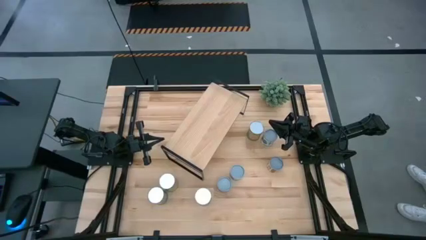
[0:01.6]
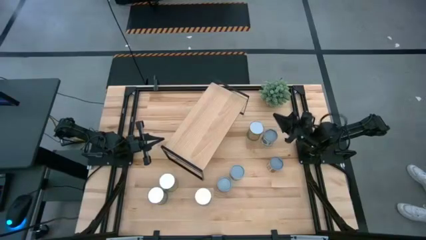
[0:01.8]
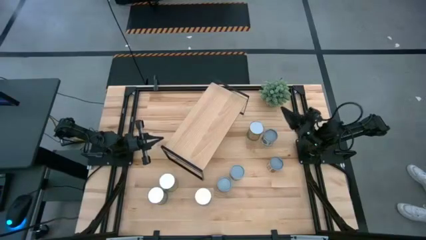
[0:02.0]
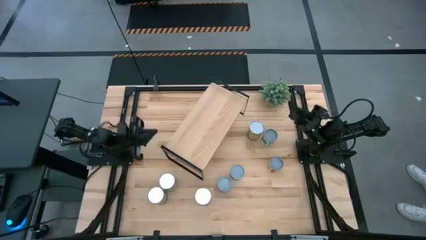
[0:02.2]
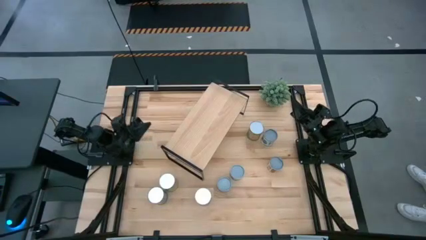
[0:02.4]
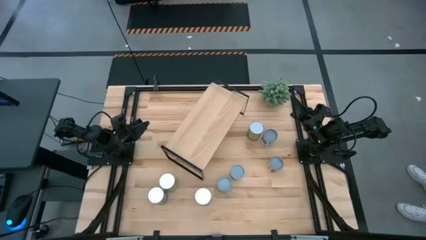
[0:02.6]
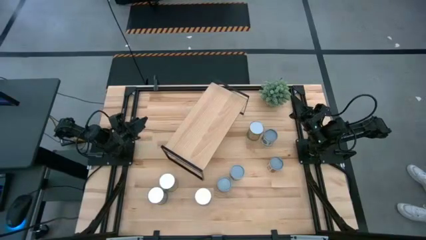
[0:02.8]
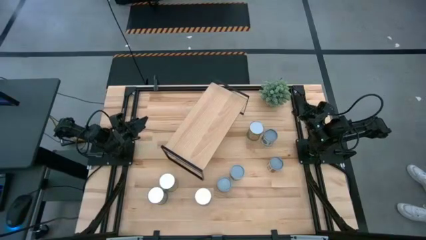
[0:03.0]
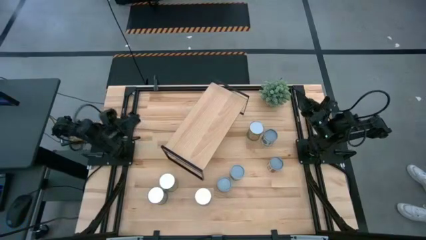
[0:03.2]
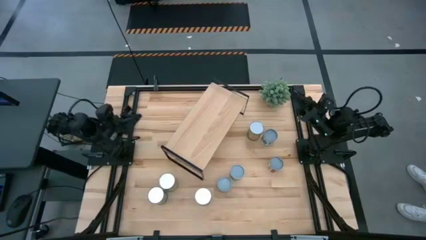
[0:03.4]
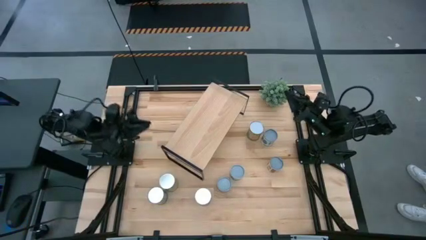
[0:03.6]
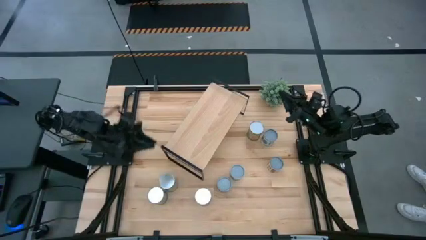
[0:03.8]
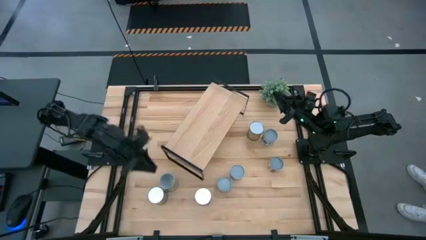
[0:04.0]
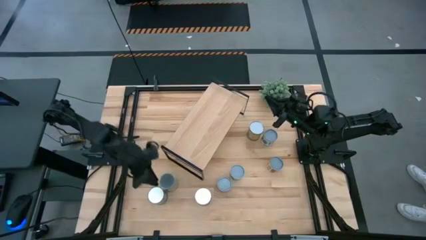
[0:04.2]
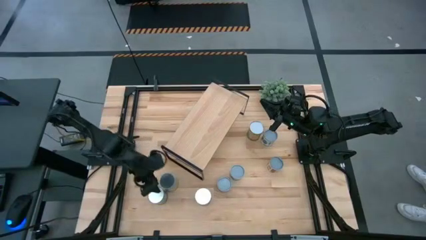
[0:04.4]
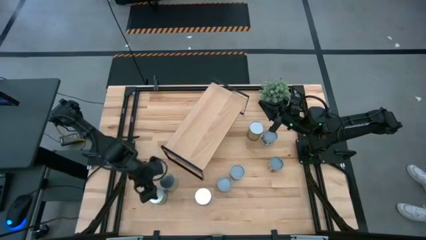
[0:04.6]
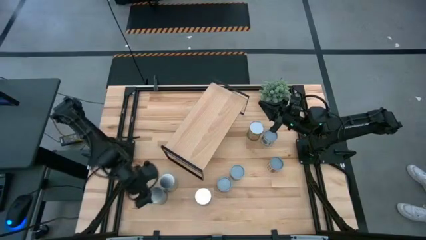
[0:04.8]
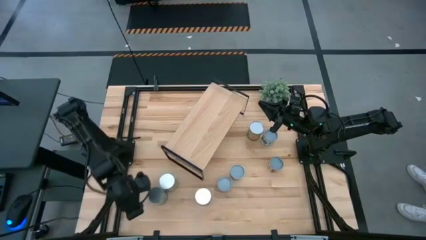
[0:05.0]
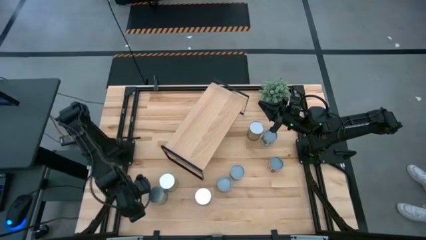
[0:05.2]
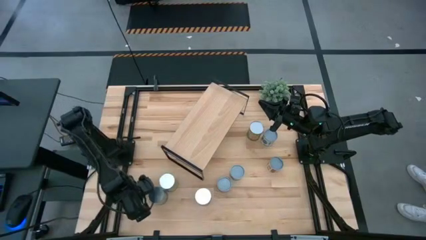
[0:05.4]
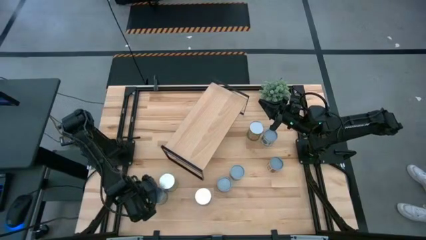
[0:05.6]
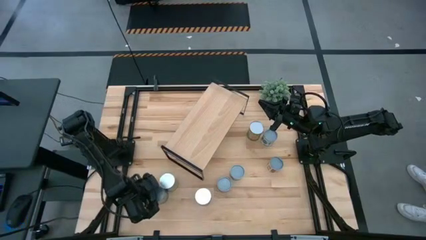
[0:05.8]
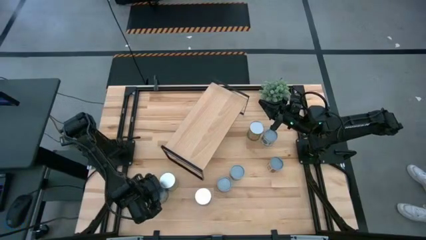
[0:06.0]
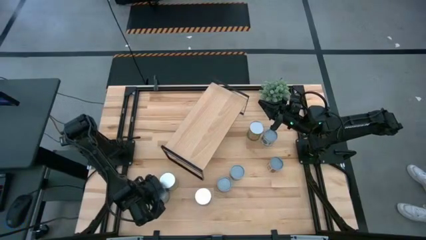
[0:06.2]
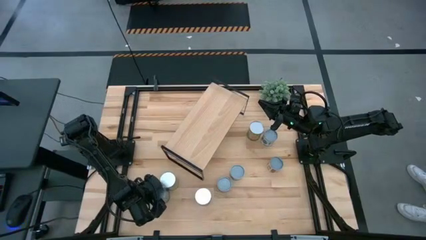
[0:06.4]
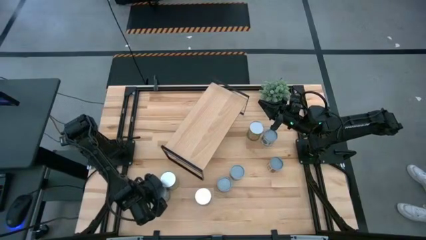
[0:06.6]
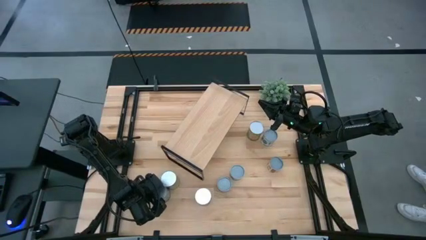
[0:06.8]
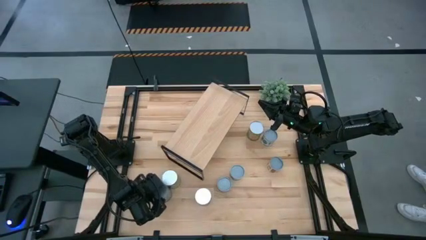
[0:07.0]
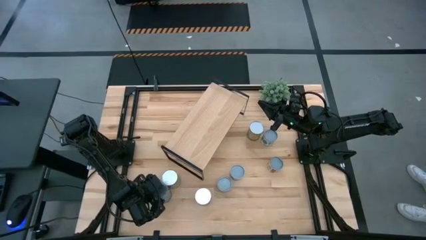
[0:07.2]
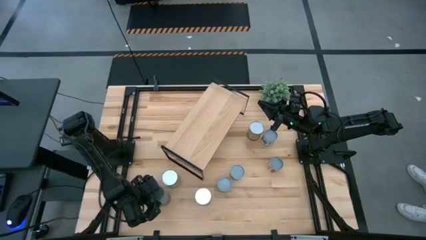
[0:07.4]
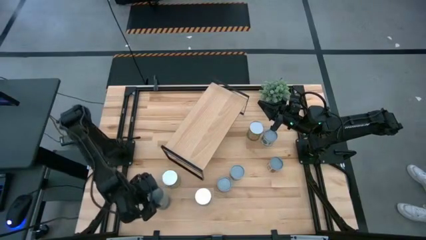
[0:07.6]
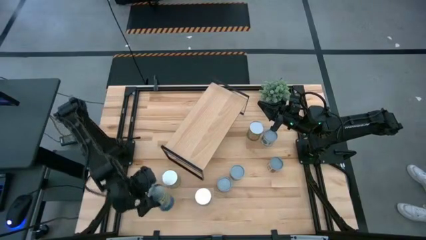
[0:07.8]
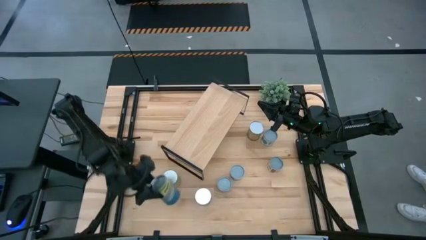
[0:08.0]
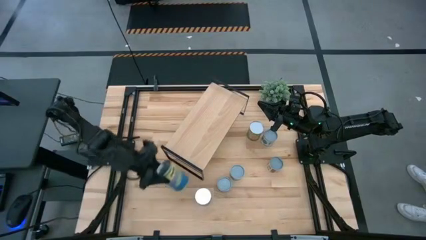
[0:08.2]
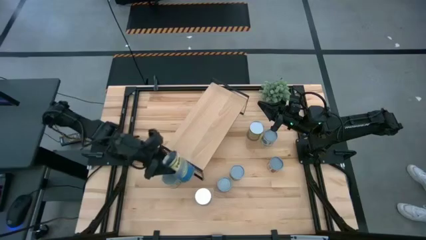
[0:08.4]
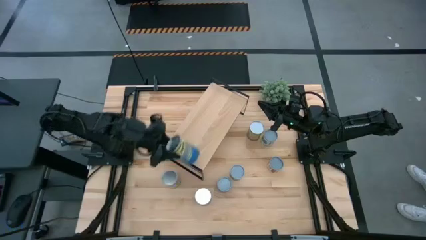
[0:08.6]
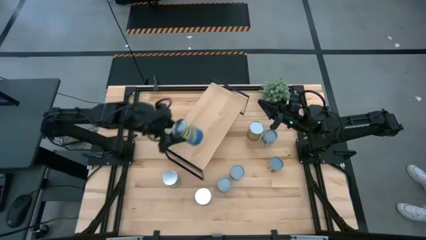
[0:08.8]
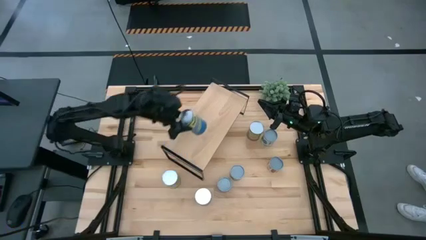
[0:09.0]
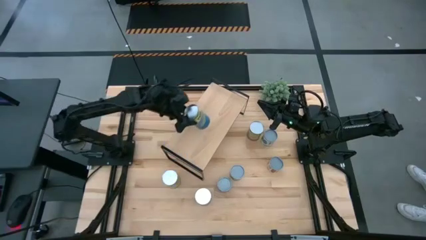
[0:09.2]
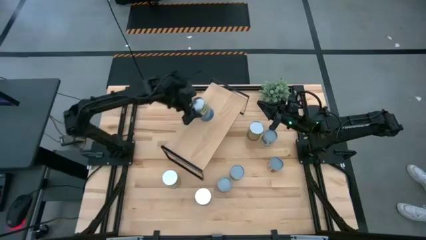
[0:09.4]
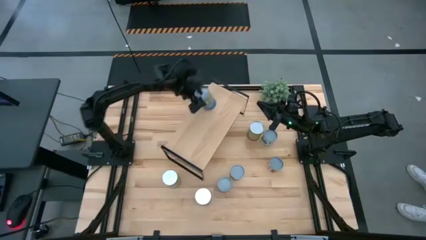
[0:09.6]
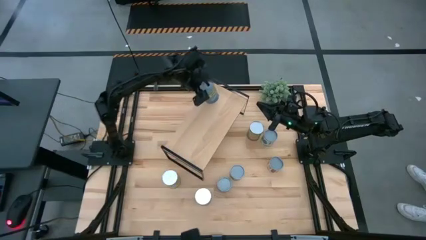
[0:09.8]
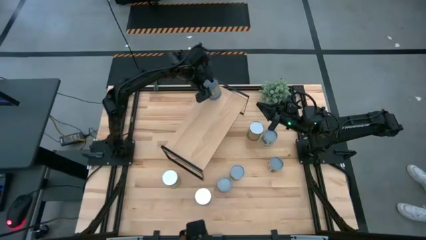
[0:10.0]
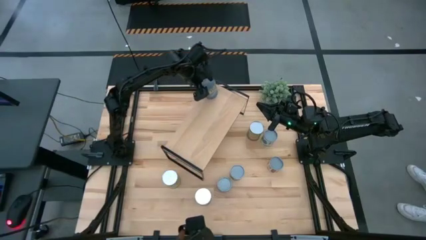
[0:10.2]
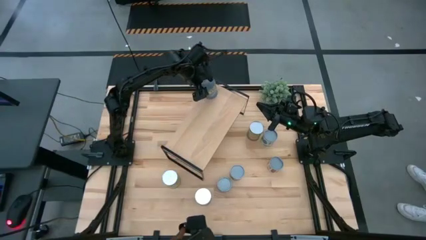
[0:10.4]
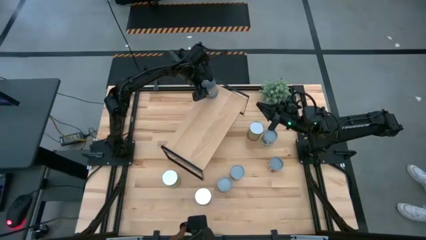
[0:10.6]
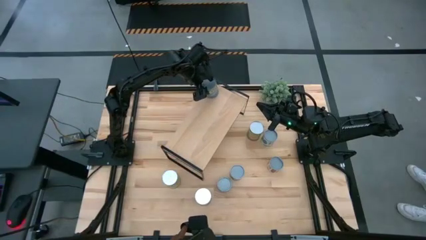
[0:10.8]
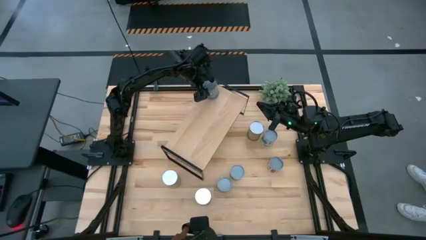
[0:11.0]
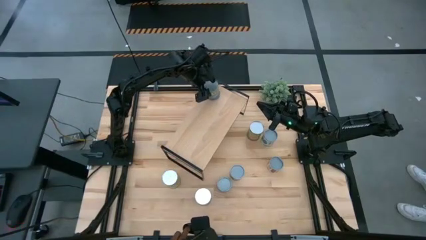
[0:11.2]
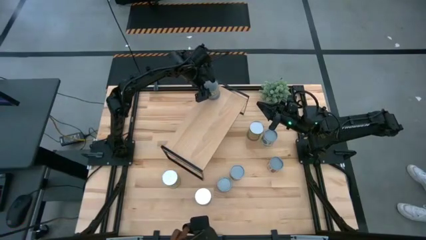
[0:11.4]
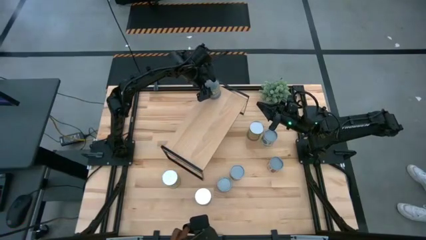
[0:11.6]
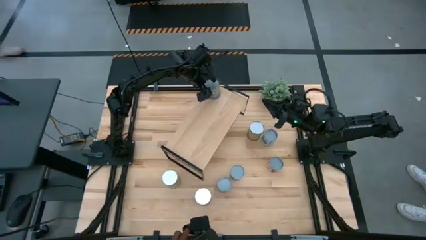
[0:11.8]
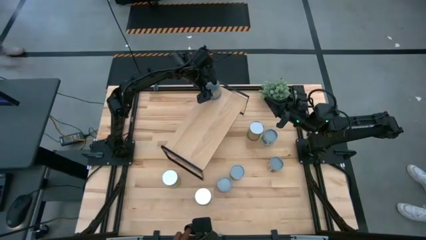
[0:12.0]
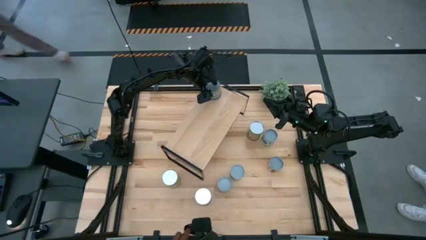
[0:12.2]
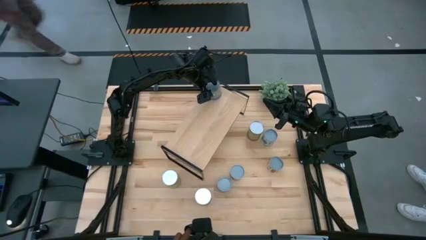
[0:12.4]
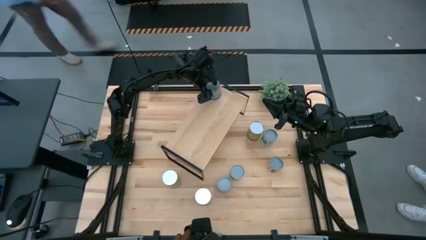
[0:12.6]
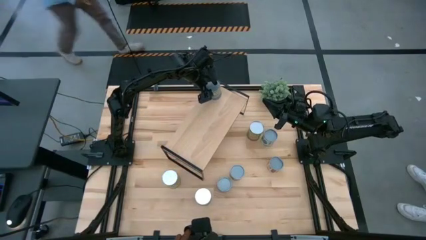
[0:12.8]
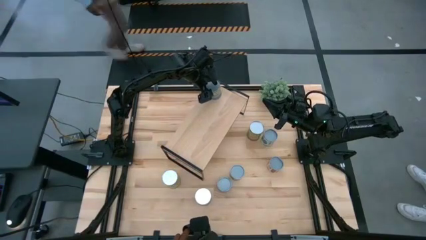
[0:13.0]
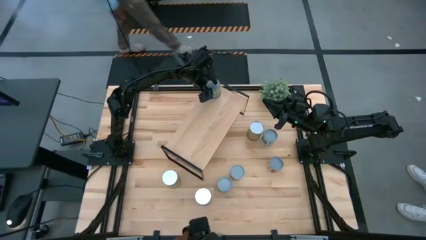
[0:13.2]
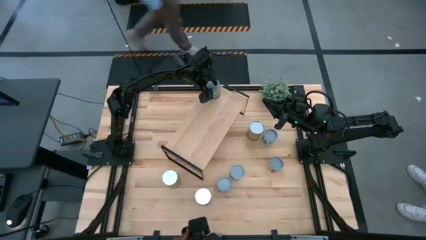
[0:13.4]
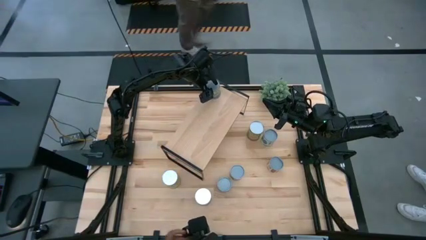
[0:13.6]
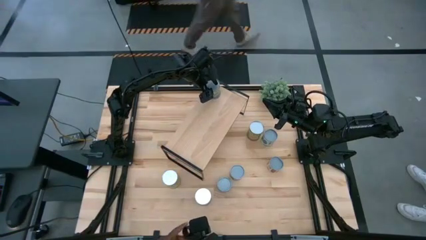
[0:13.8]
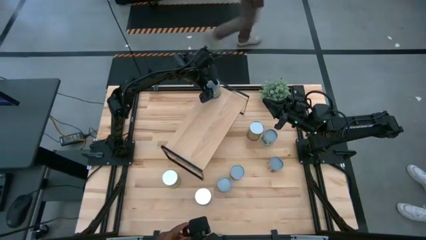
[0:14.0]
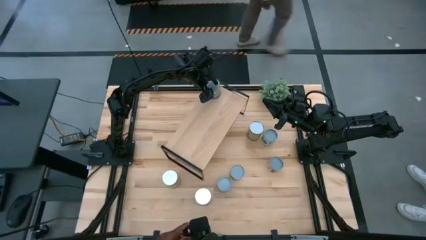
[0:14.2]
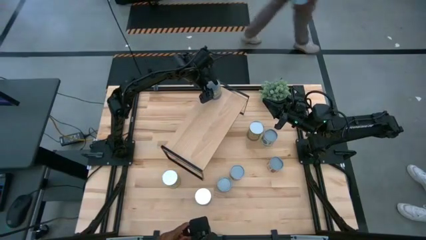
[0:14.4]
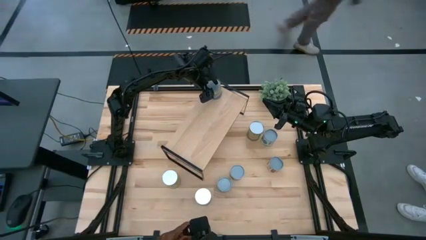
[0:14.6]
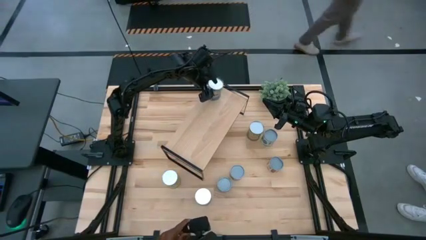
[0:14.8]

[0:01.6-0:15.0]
Task: Pick and place cans onto a shelf
Put the canned peas on the shelf
